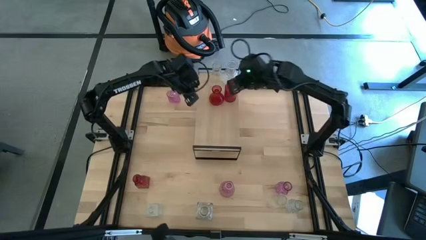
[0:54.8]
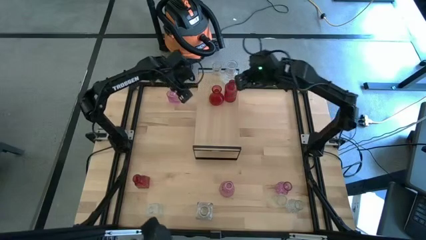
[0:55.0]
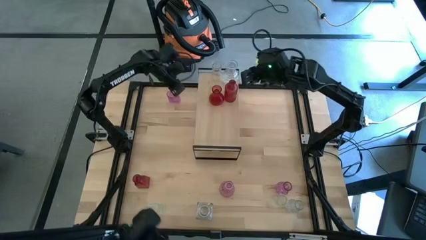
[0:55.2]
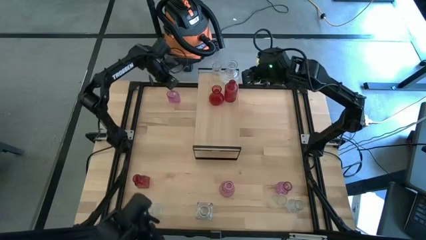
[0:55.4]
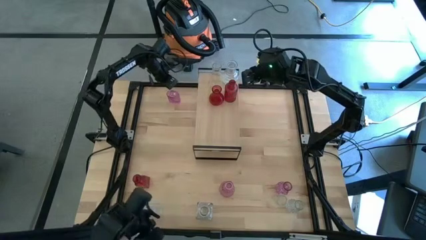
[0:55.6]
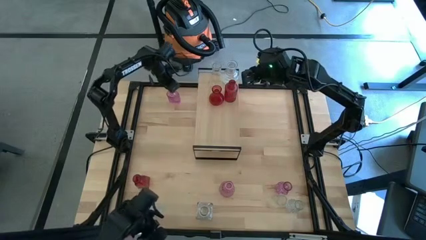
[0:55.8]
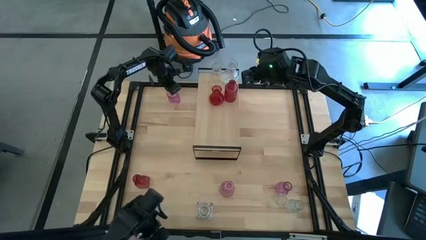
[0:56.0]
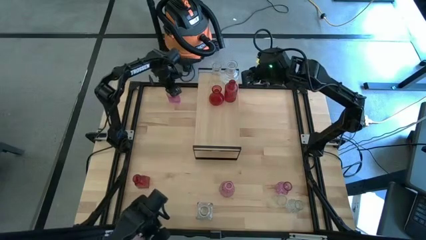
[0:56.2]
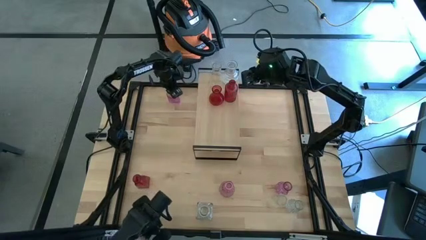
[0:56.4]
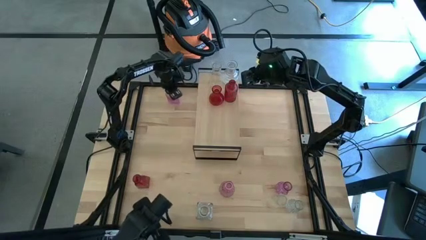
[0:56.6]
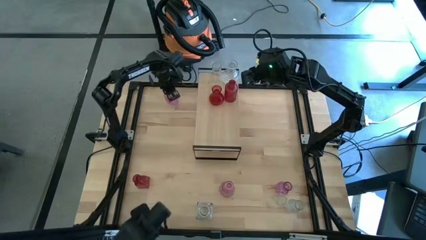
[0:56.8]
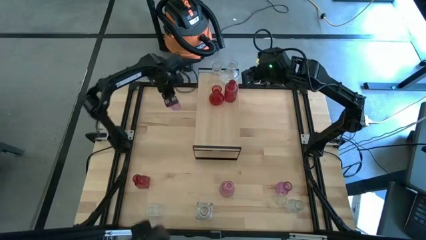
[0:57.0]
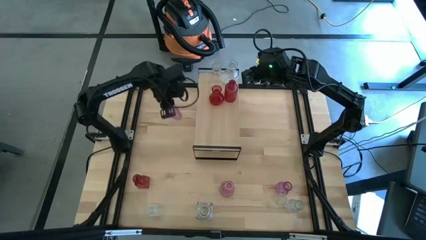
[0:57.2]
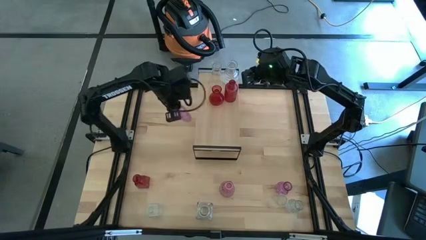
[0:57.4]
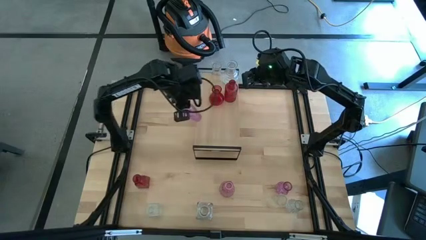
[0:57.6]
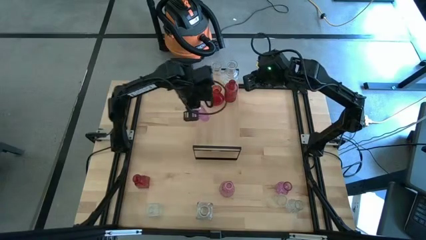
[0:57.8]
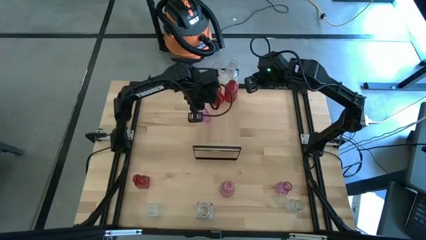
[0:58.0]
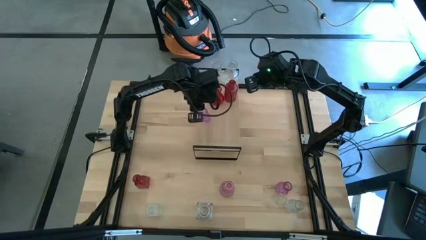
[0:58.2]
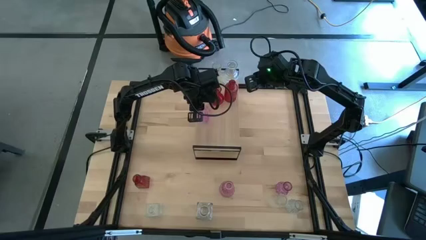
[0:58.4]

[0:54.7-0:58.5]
Task: sort vases onto shelf
Put the purple vase on the shelf

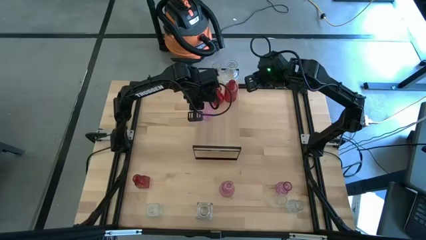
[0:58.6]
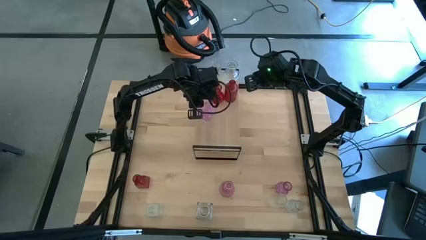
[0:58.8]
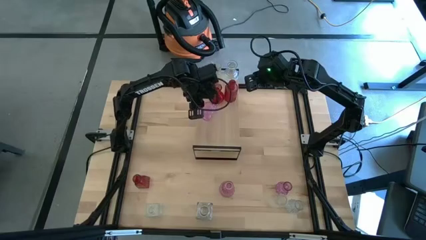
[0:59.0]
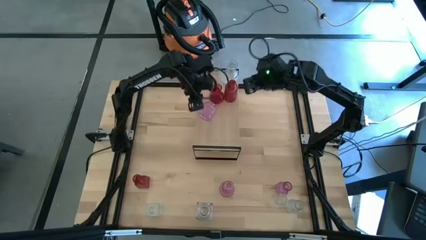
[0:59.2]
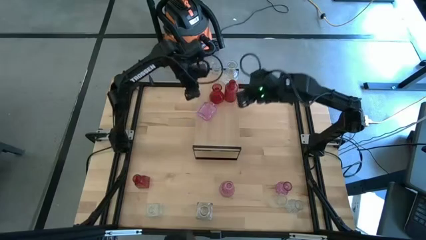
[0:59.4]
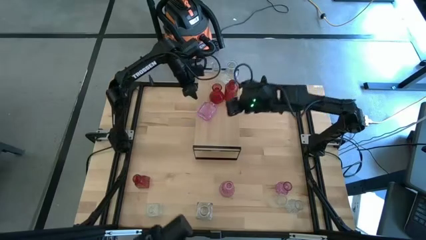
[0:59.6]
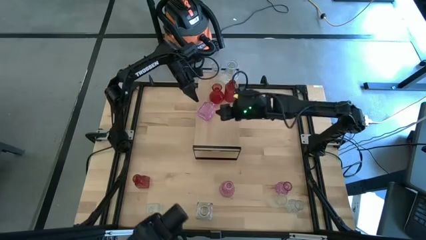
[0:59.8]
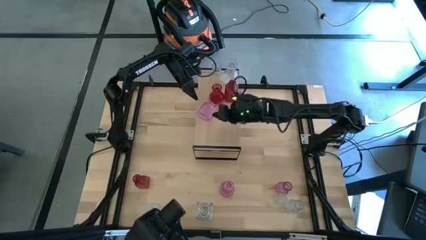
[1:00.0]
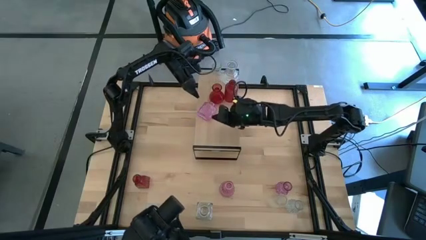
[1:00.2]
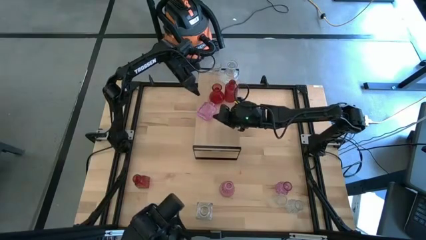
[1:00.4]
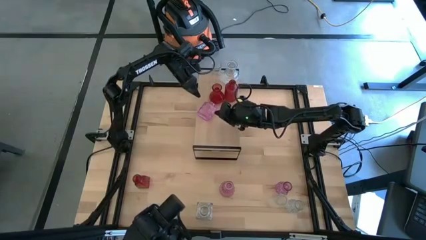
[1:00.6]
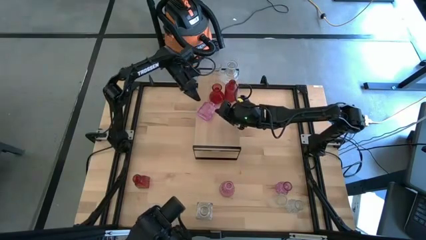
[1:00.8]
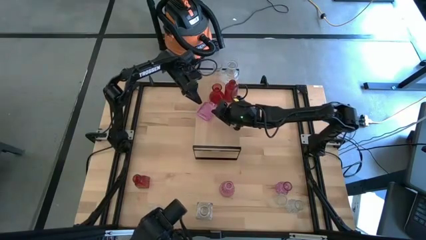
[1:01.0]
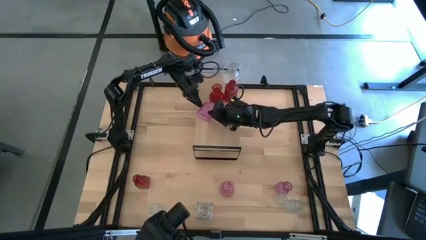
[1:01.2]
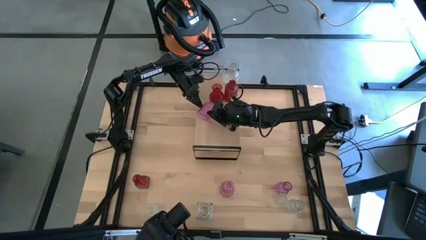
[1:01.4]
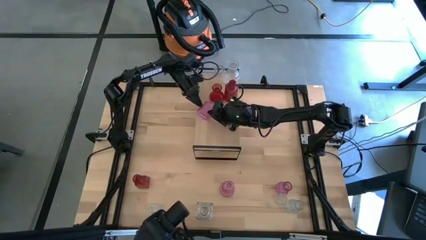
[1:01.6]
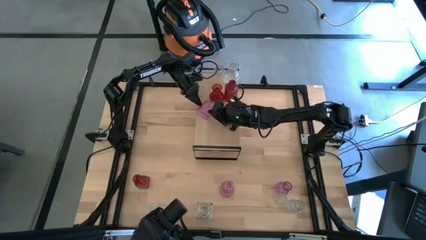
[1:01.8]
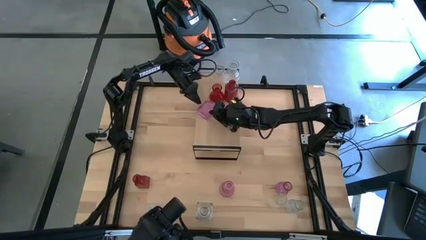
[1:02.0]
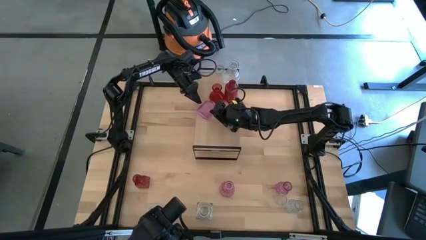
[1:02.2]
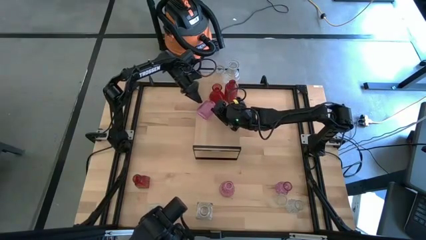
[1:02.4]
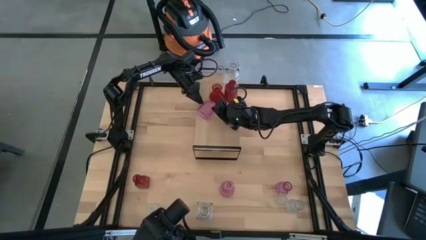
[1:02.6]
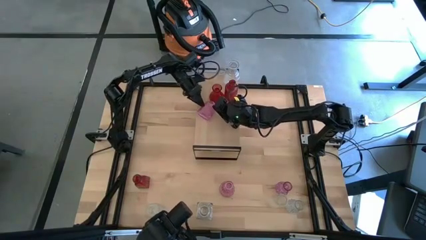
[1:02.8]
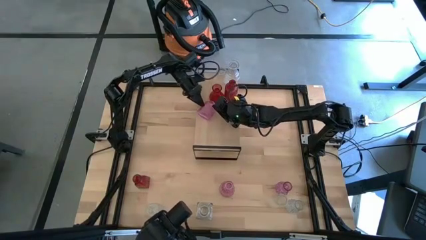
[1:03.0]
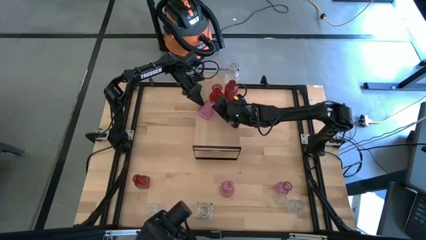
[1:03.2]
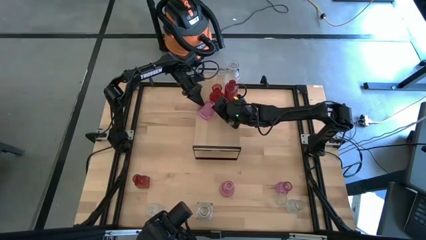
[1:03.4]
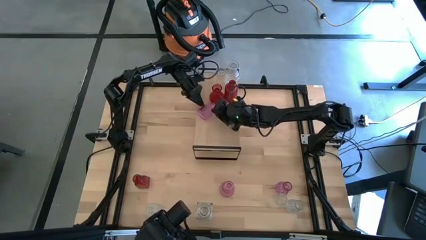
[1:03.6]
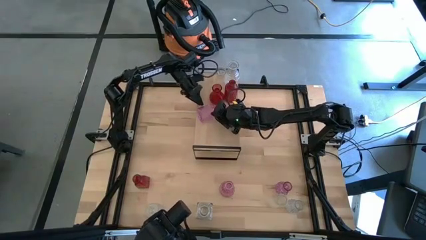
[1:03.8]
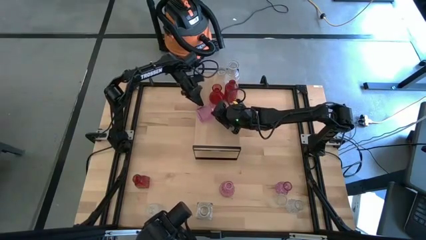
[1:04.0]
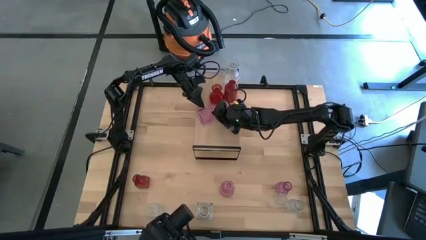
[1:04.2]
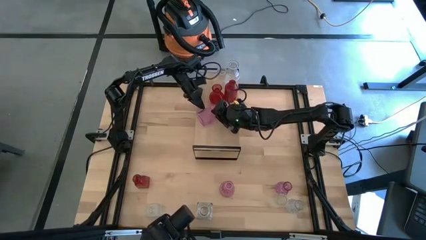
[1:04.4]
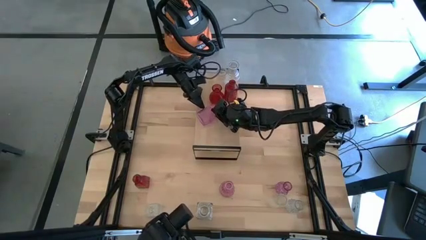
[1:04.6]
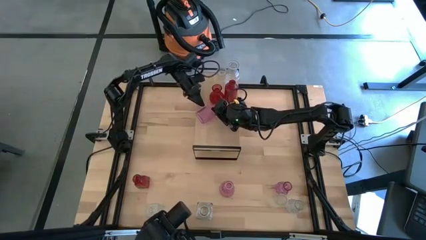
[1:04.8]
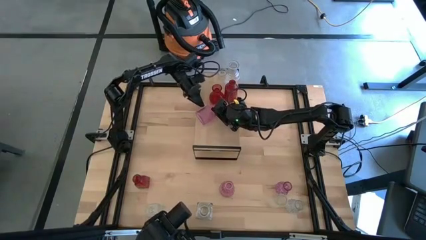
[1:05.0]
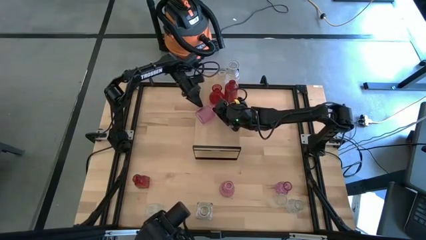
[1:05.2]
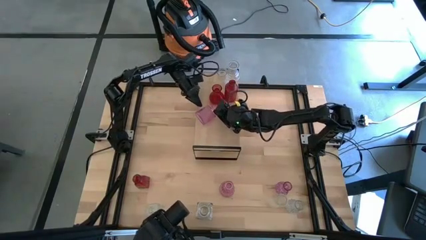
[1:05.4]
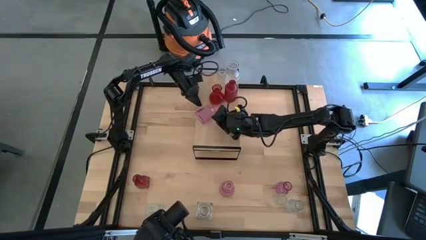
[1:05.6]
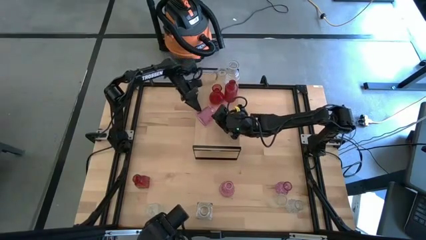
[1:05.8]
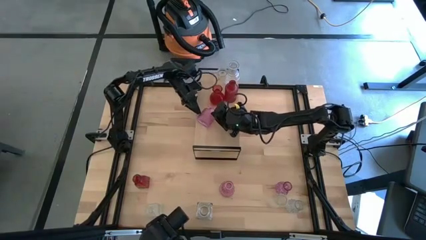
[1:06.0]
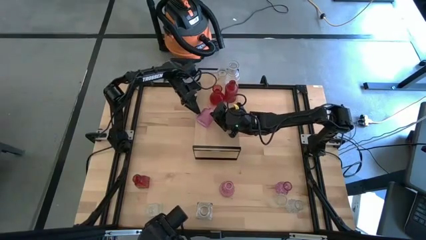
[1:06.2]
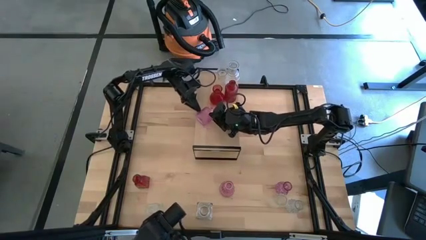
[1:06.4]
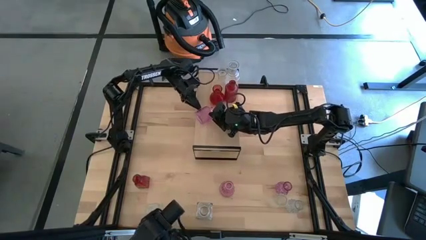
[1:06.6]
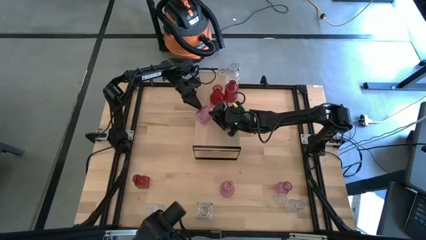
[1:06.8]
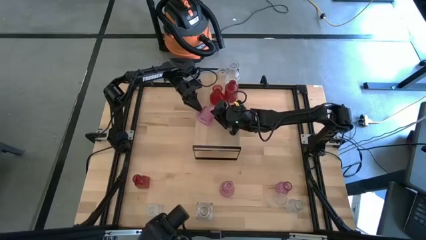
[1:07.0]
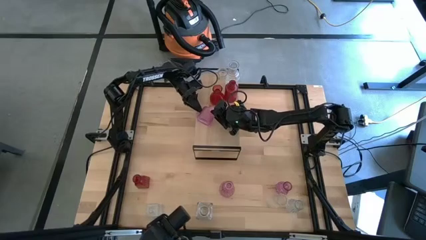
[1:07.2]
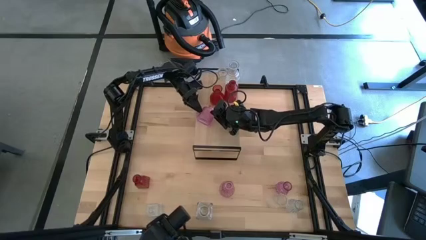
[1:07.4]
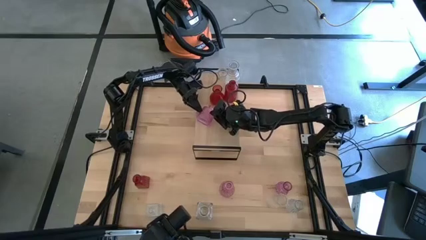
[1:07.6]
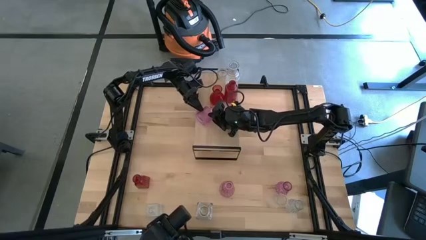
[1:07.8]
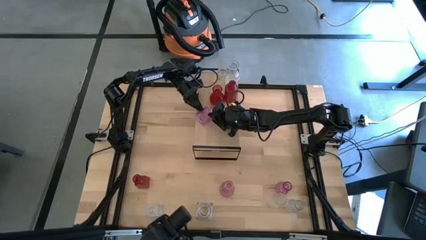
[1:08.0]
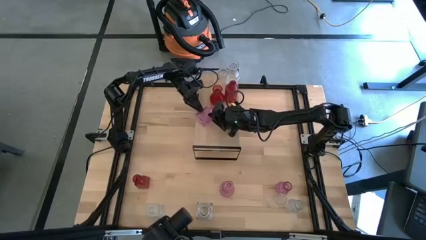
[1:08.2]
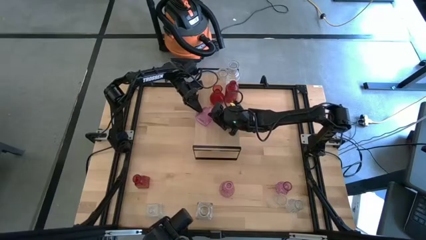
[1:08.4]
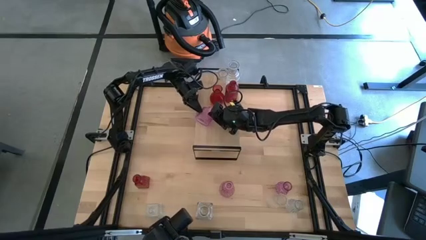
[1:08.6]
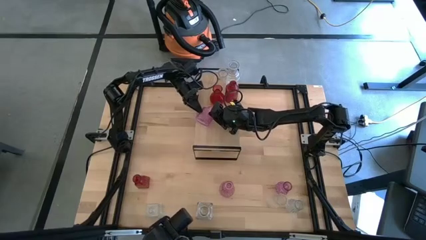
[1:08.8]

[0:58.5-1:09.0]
Put the purple vase on the shelf

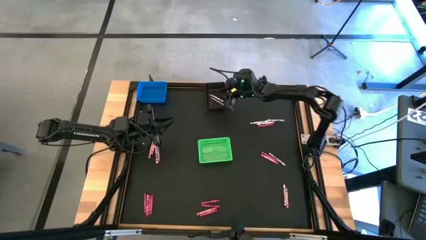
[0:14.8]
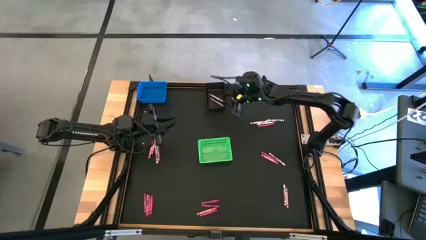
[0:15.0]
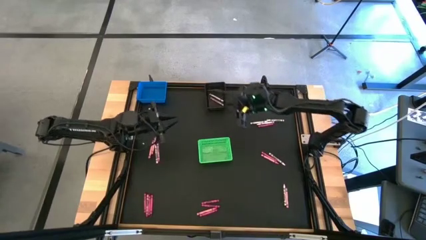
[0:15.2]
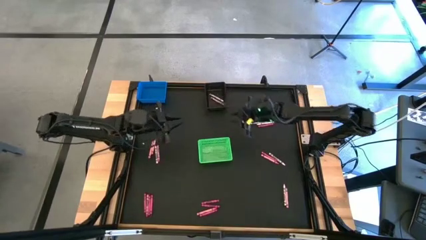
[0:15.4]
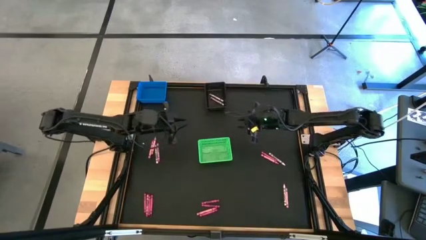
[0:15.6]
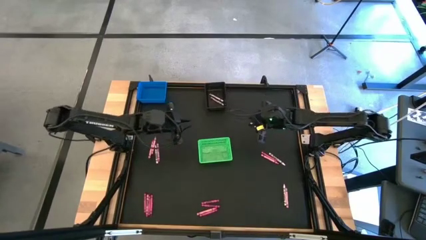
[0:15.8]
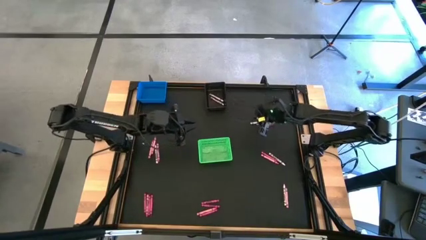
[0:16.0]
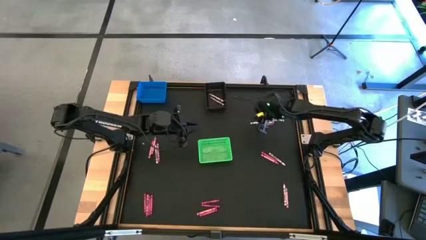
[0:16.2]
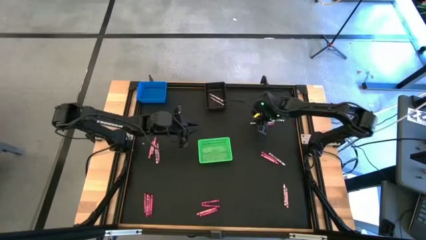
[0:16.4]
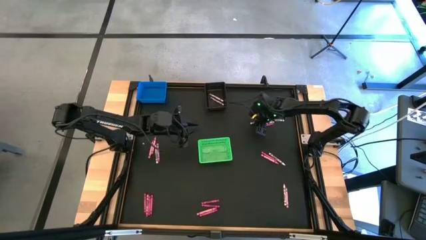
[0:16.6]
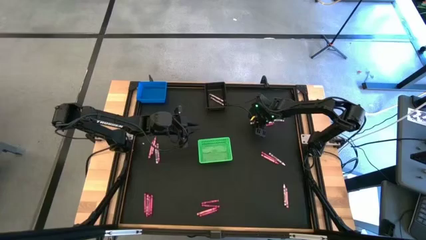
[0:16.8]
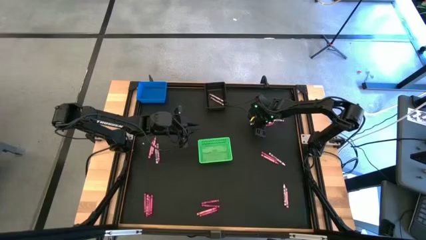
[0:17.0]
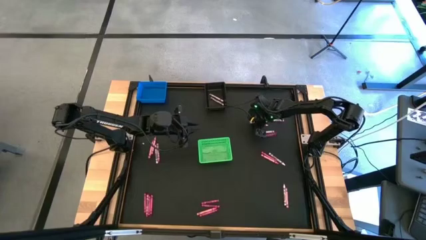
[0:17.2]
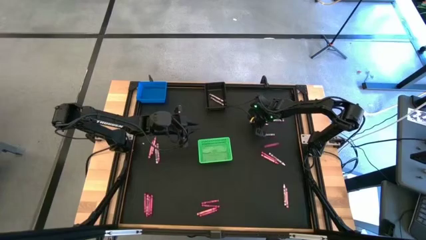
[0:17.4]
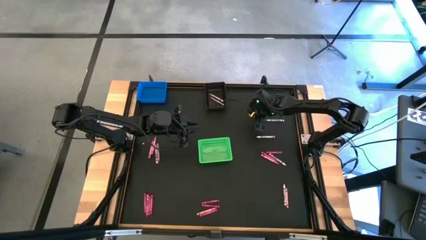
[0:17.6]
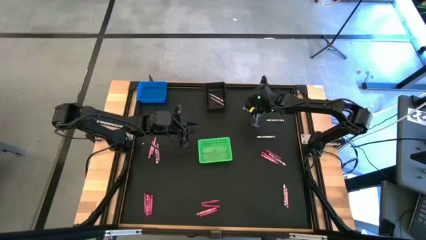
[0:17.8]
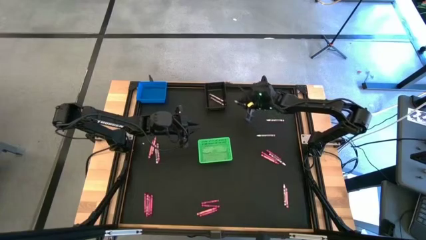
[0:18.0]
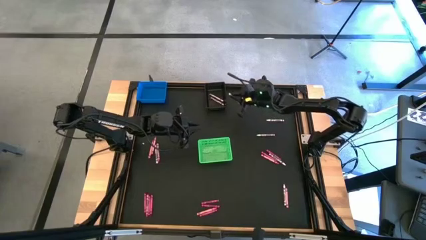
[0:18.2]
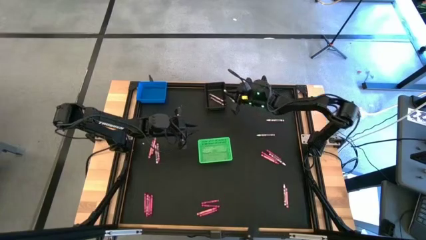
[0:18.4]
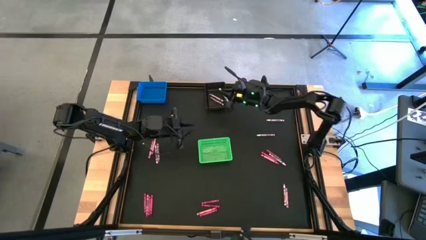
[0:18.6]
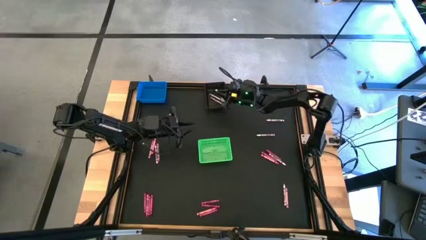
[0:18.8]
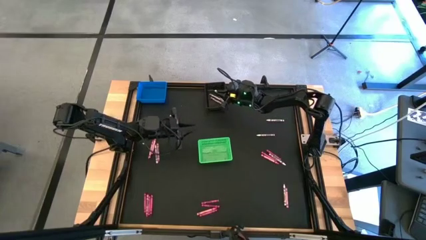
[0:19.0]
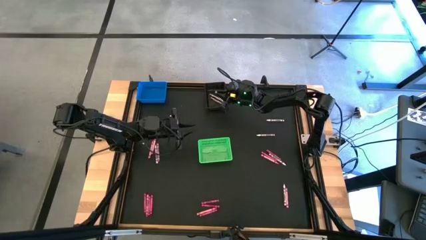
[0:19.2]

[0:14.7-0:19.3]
Task: Sort crayons
Put the white crayon into the black bin
